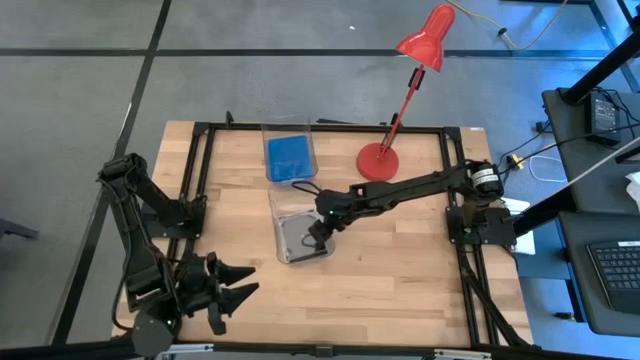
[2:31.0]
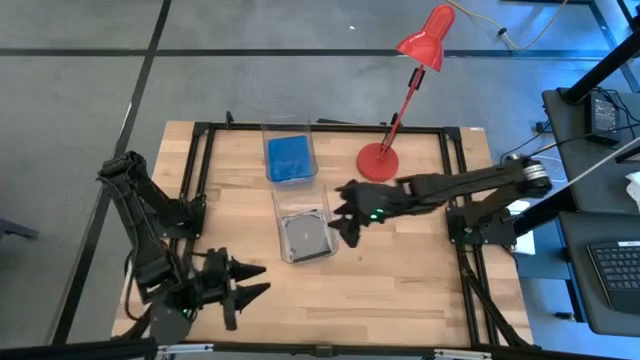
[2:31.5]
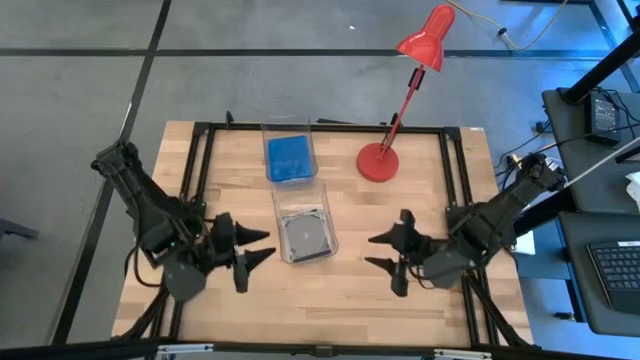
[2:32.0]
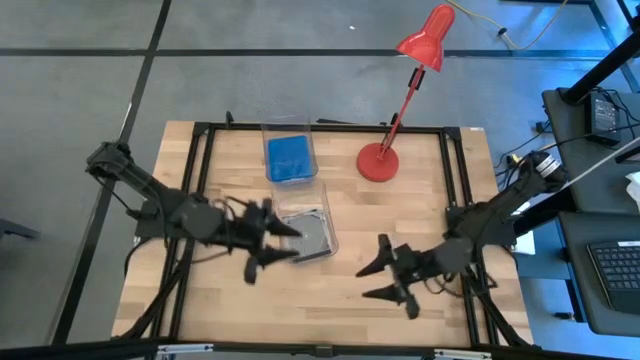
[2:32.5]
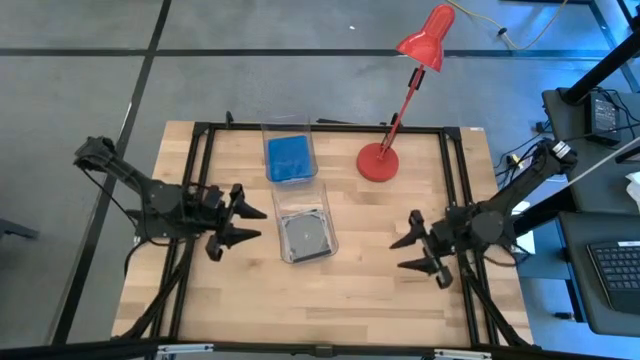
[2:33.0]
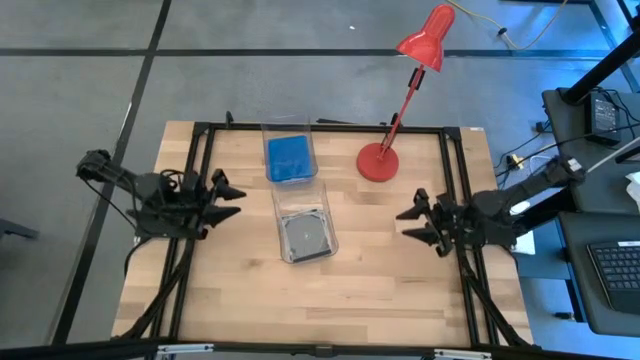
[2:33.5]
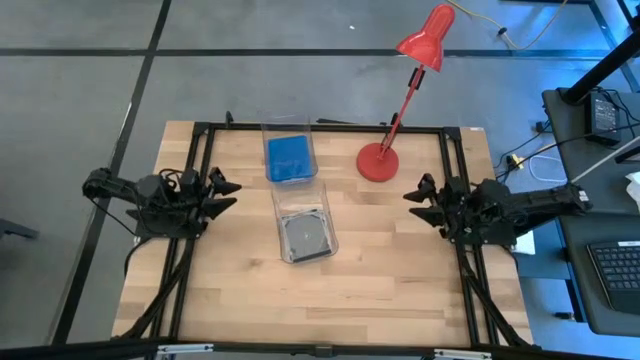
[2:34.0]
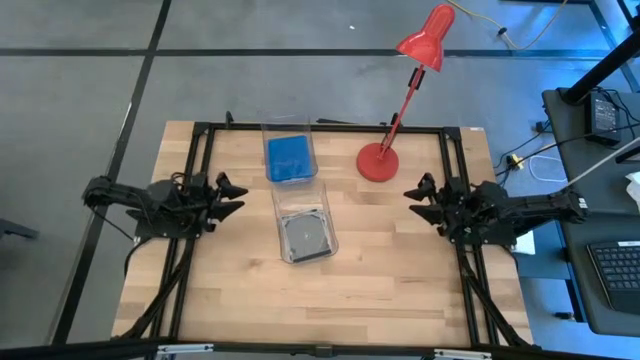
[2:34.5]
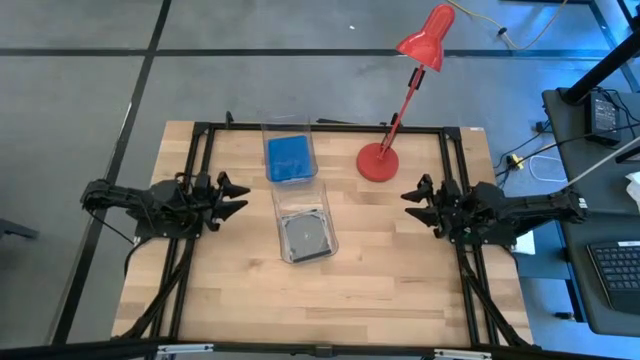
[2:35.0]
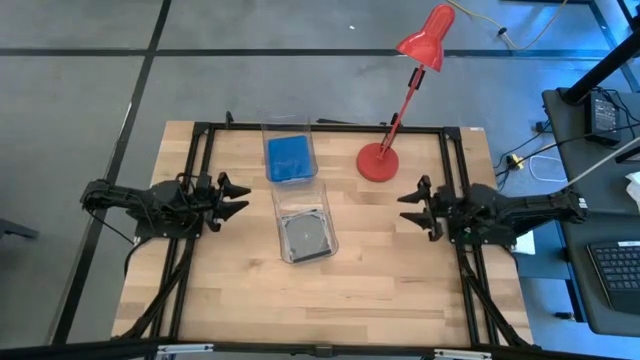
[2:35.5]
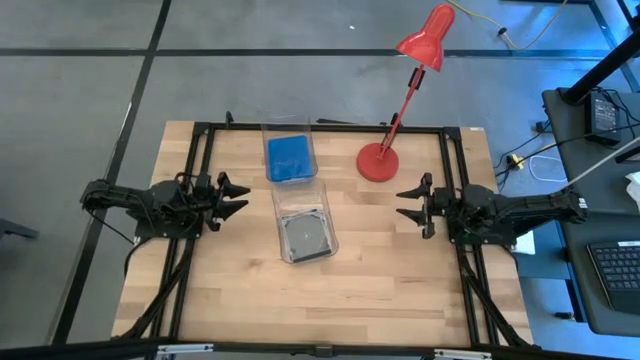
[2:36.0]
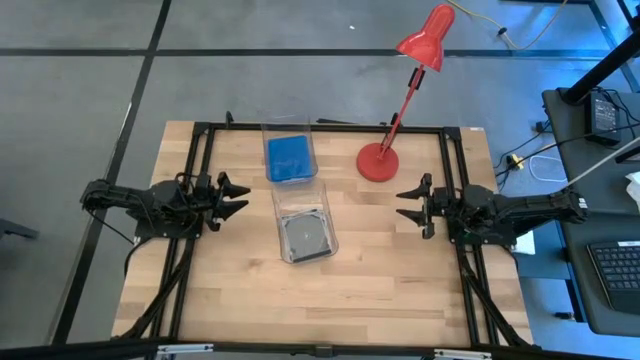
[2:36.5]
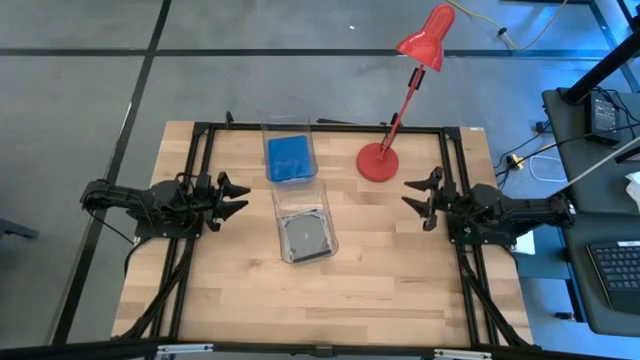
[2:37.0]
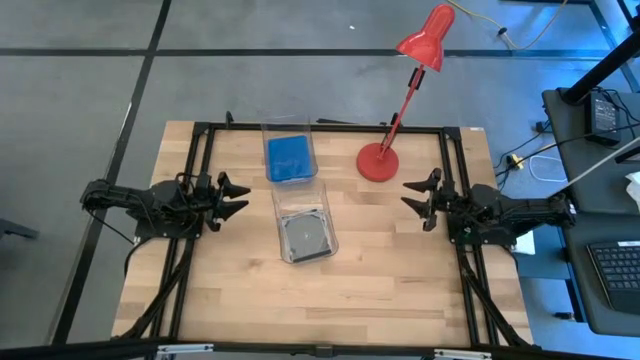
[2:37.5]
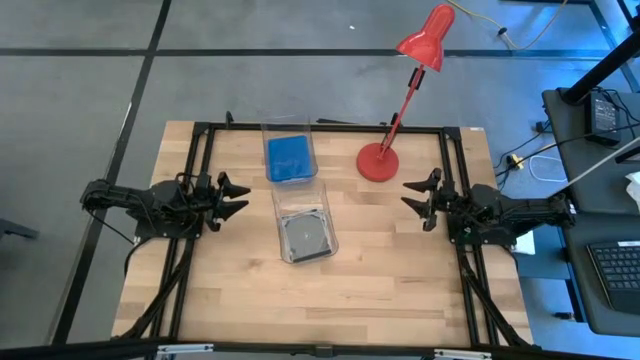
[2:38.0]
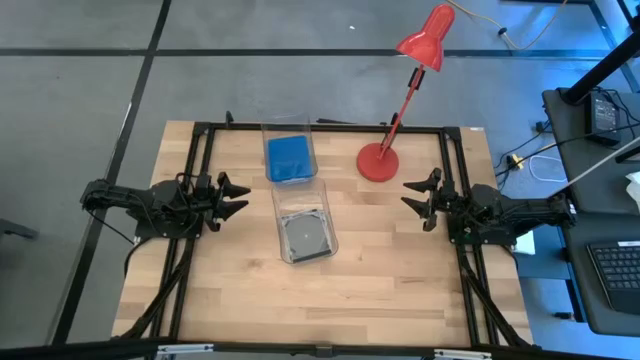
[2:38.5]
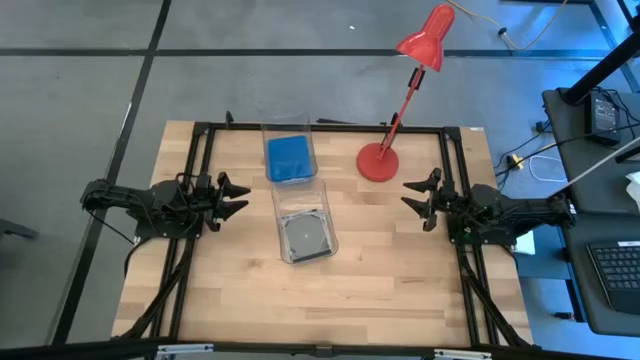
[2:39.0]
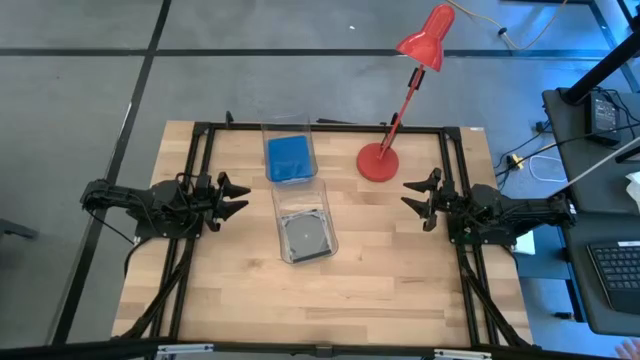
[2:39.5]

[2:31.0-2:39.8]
Task: Pick & place jewel cases by type
Return to Home Position

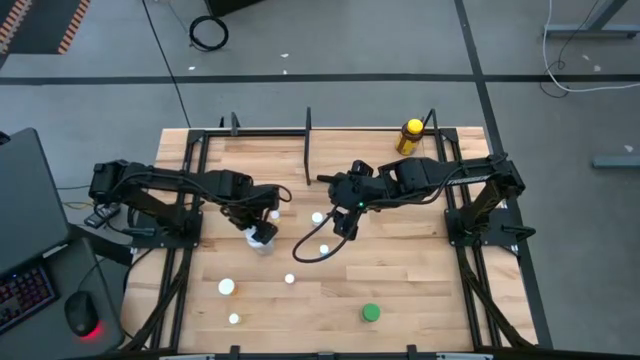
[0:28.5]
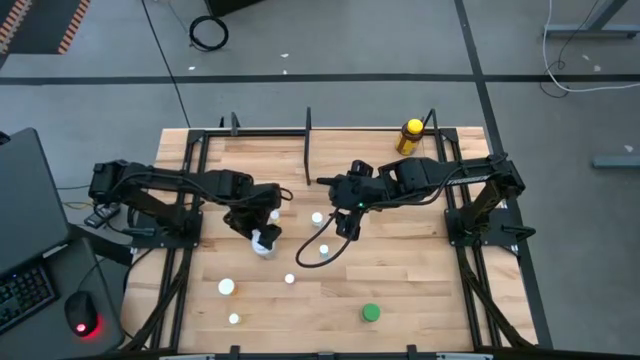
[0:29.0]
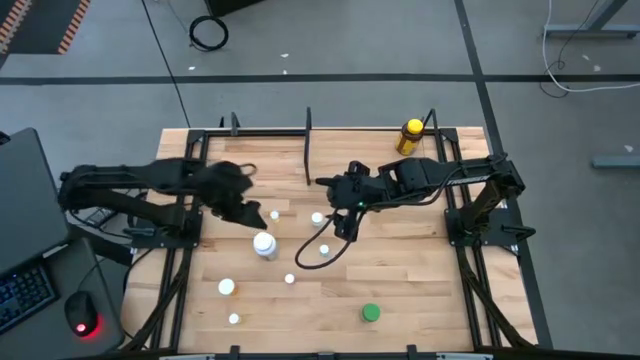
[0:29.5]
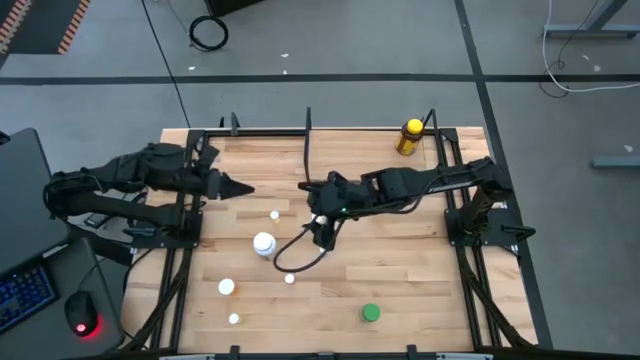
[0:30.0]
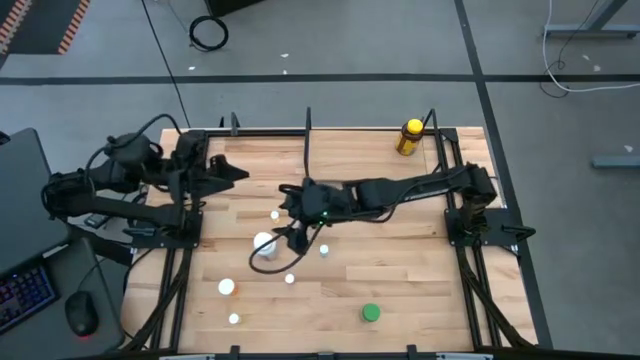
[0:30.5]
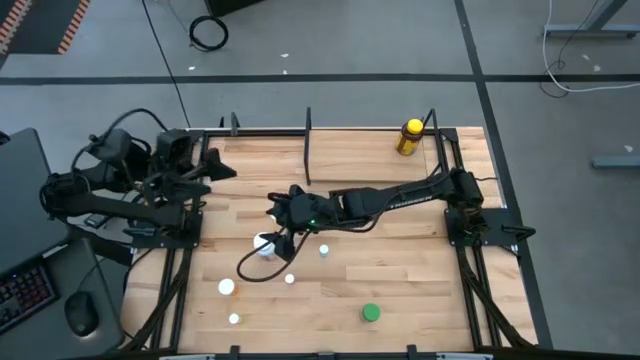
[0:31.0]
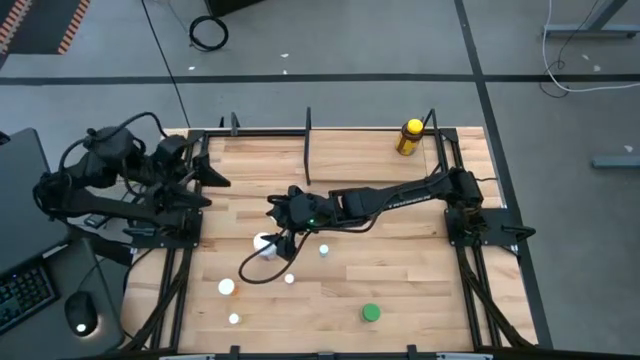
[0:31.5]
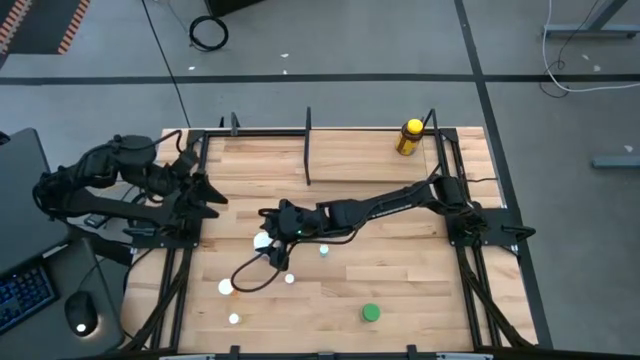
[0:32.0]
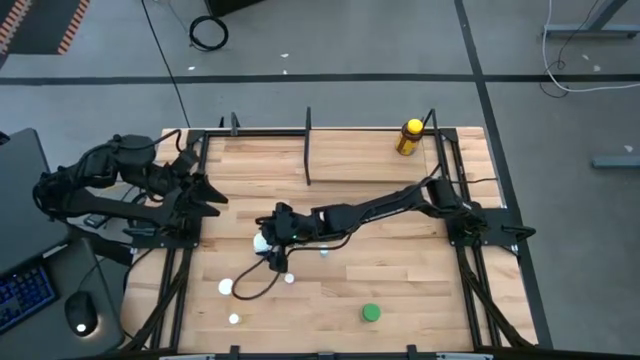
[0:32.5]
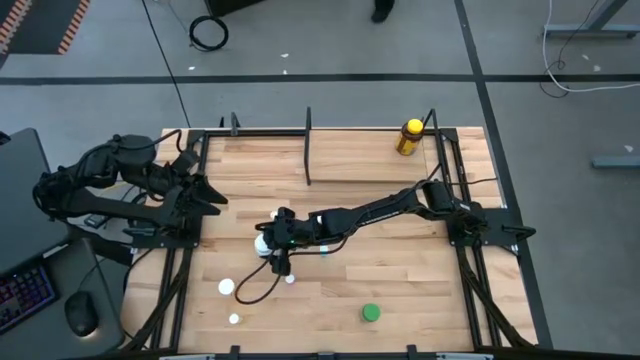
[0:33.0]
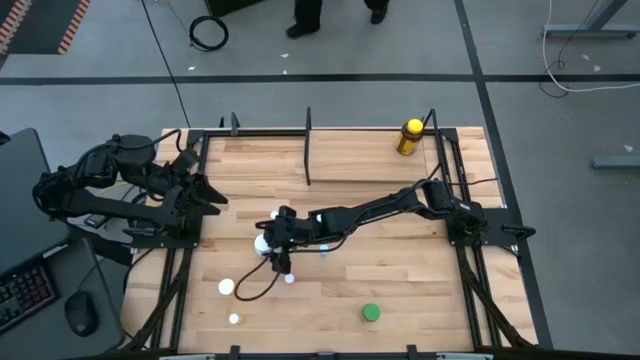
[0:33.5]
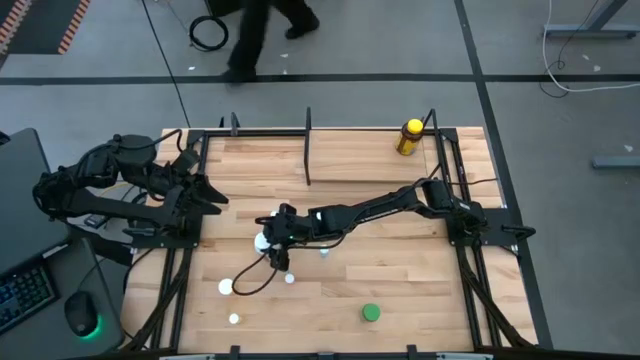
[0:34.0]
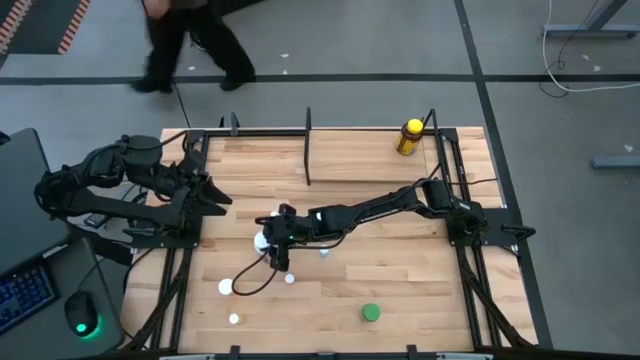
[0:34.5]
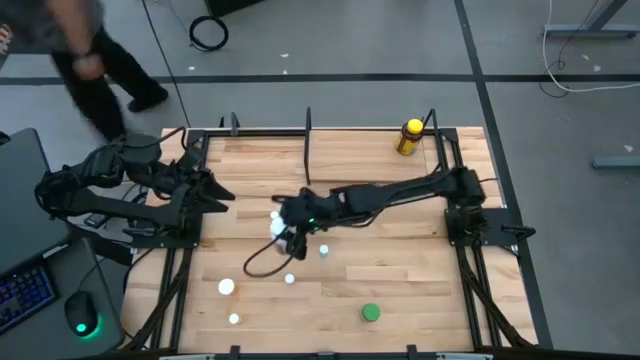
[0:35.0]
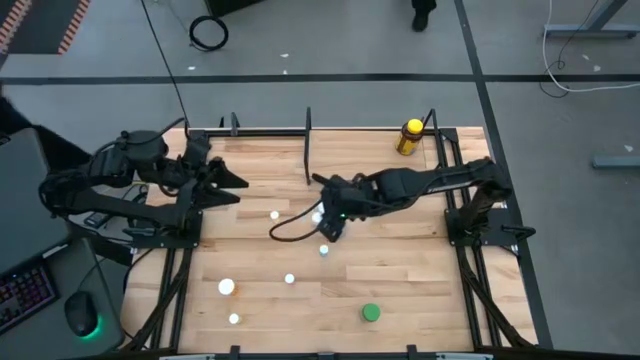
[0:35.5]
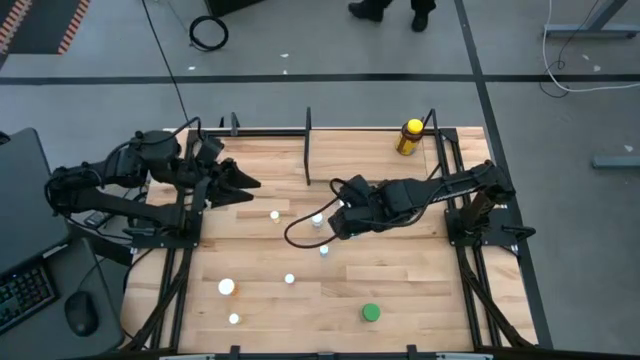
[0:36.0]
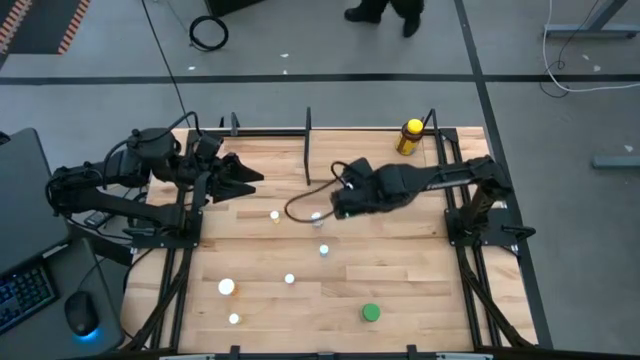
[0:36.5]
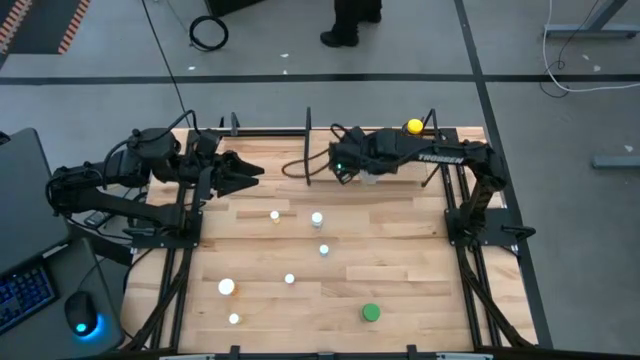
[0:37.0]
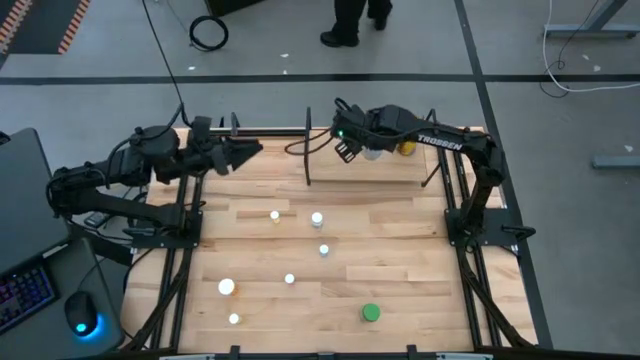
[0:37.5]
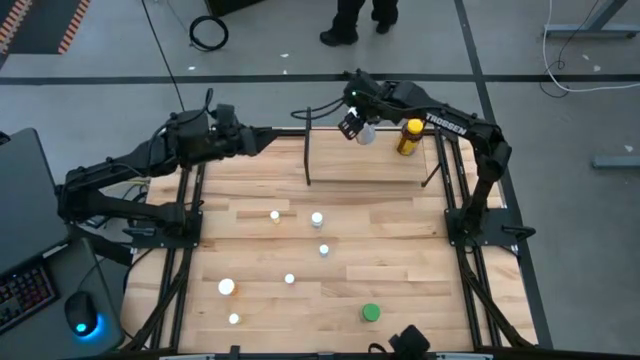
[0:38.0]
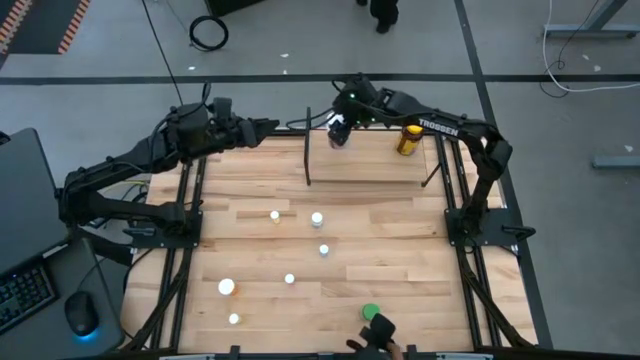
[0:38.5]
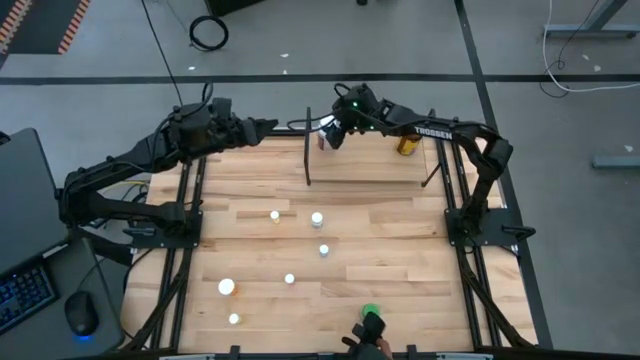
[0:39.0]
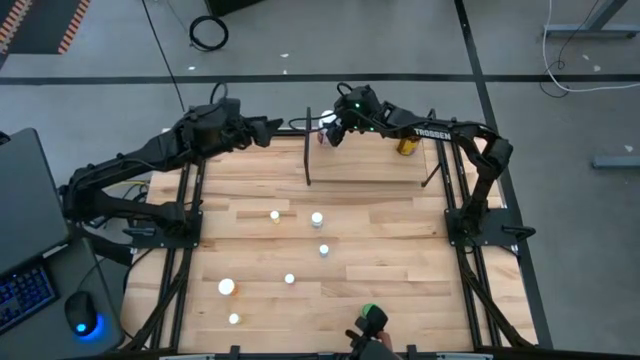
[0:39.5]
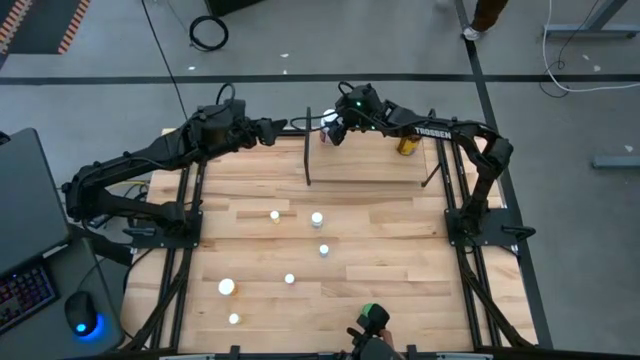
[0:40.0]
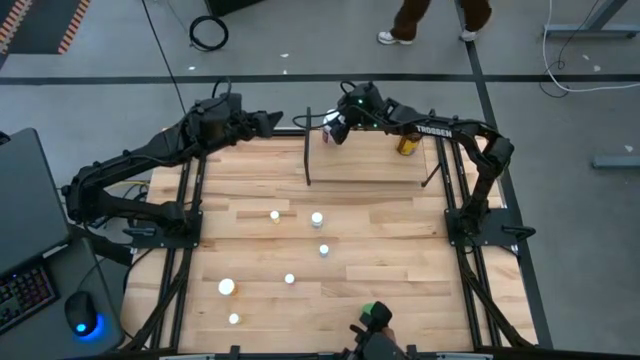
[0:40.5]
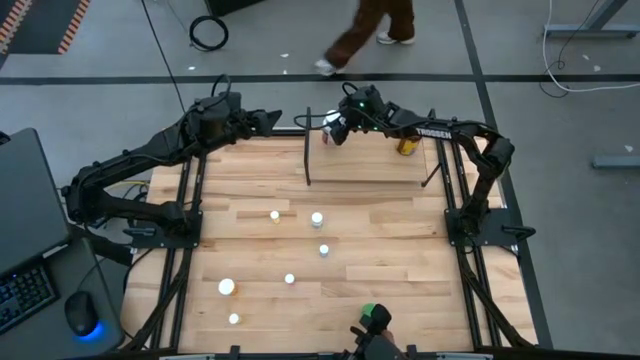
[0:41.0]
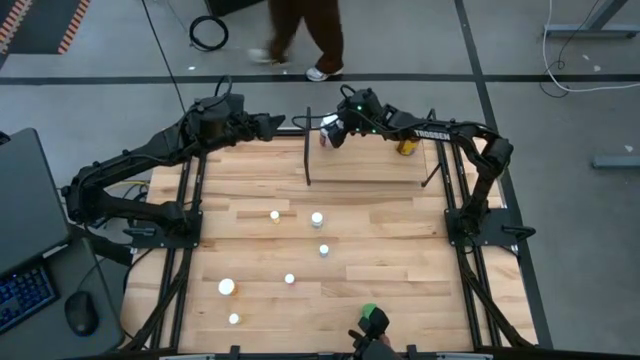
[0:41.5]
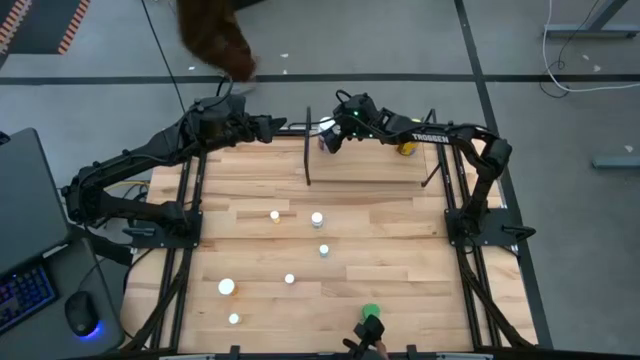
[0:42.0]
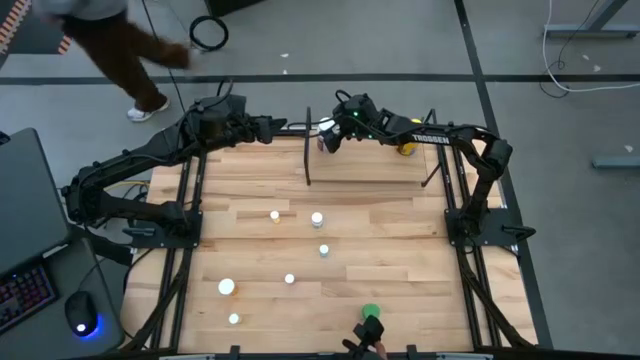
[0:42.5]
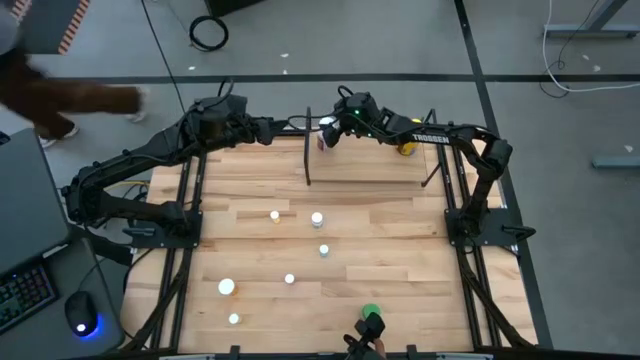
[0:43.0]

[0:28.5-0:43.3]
Task: Pick and place medicine bottles onto shelf by color
Put the large white pill bottle on the shelf
